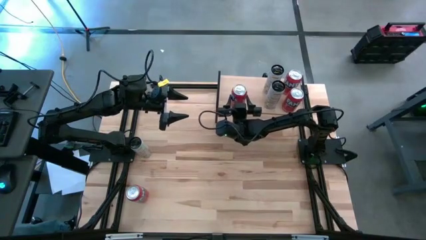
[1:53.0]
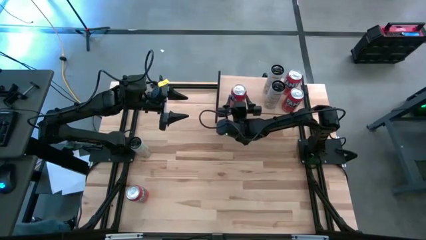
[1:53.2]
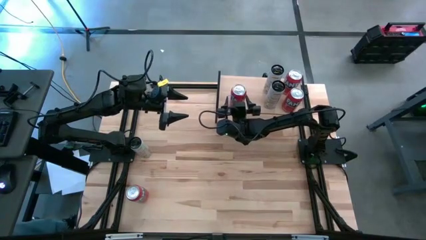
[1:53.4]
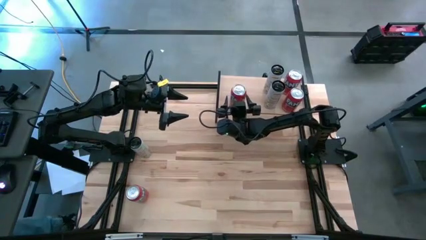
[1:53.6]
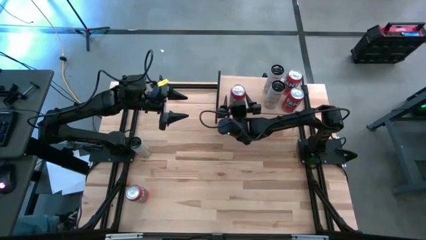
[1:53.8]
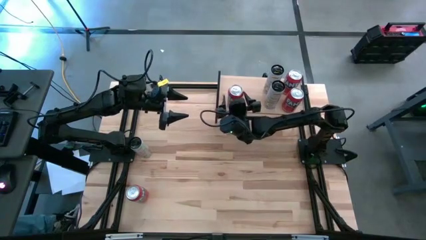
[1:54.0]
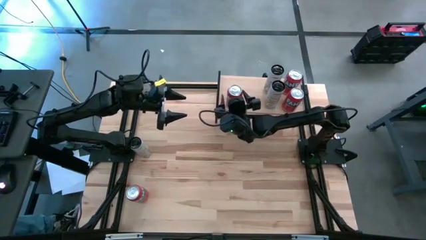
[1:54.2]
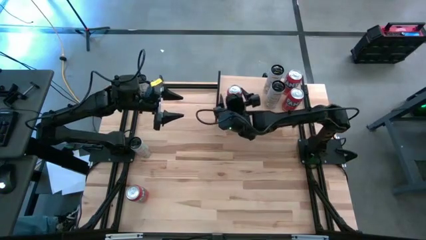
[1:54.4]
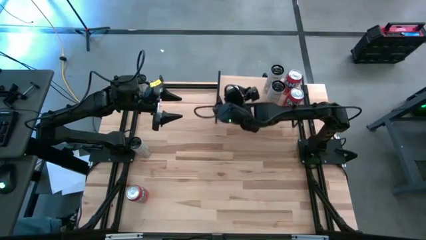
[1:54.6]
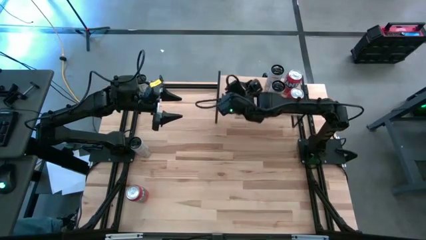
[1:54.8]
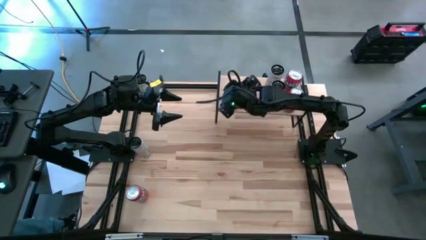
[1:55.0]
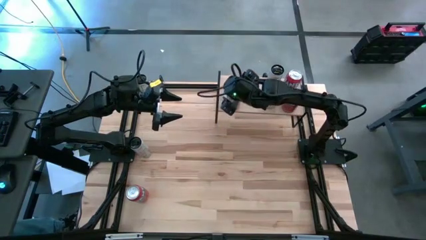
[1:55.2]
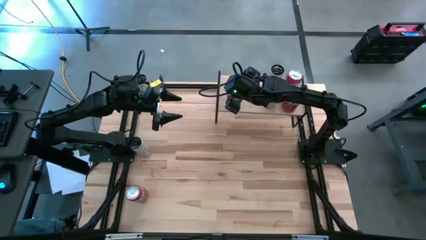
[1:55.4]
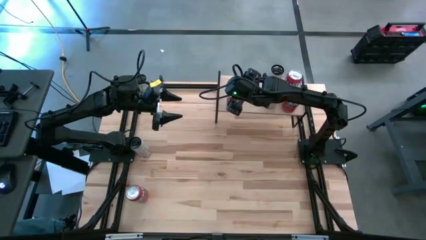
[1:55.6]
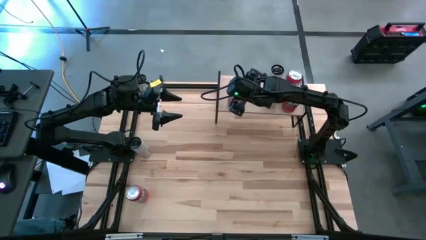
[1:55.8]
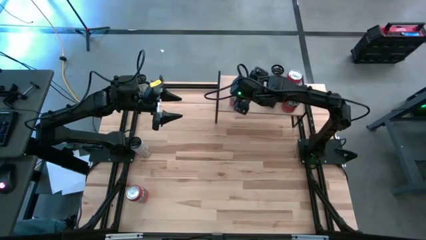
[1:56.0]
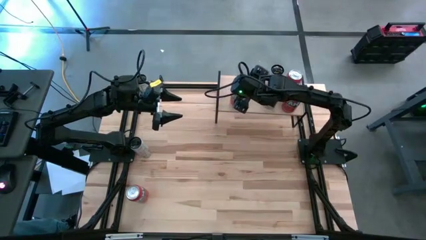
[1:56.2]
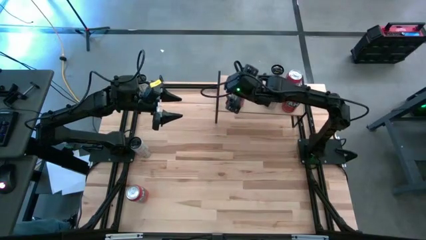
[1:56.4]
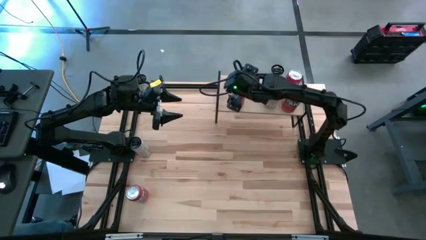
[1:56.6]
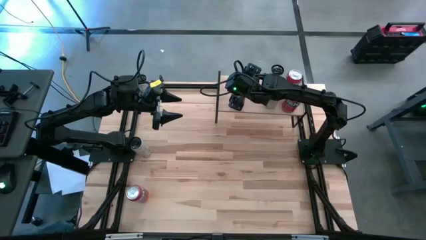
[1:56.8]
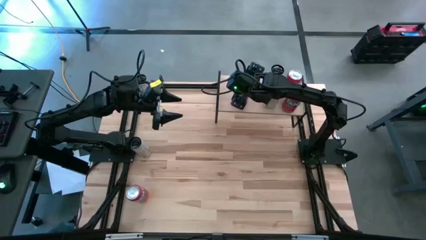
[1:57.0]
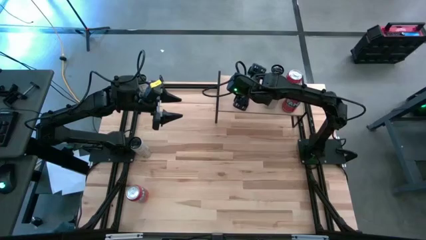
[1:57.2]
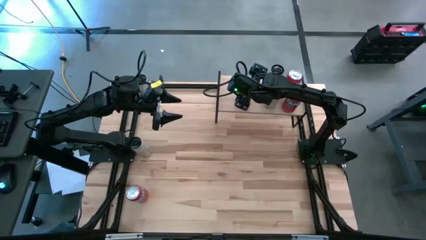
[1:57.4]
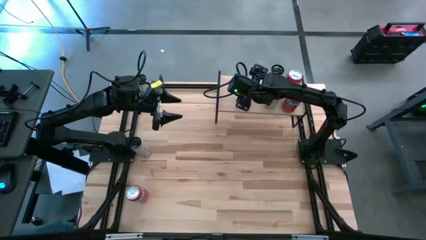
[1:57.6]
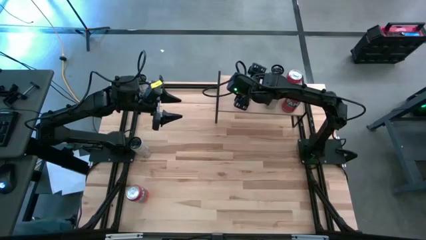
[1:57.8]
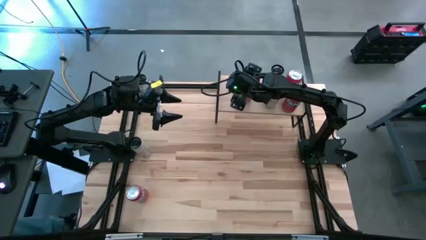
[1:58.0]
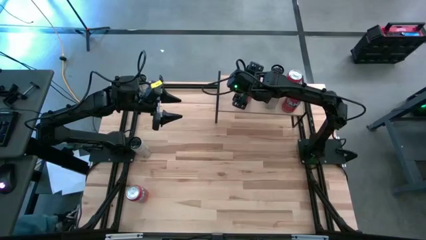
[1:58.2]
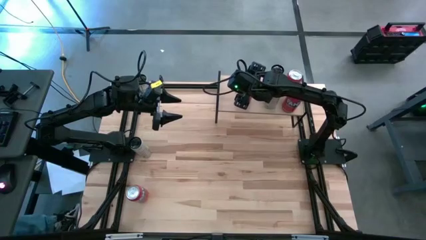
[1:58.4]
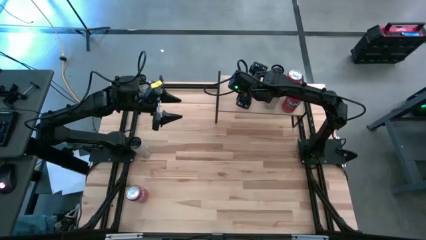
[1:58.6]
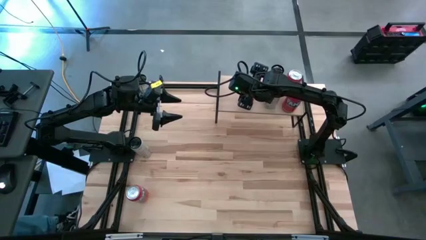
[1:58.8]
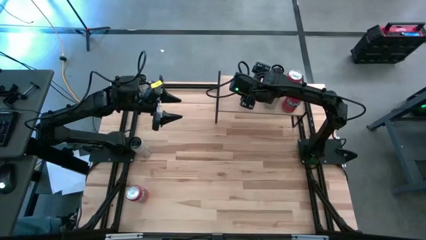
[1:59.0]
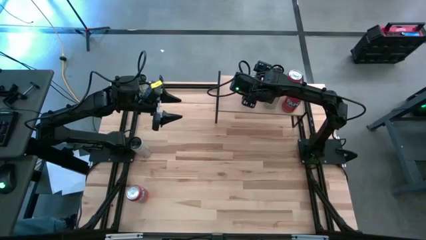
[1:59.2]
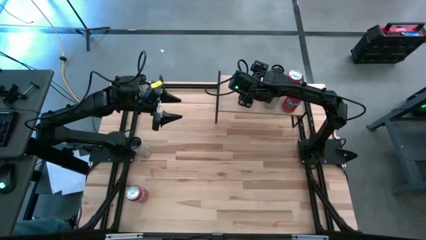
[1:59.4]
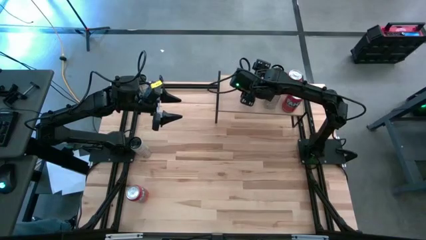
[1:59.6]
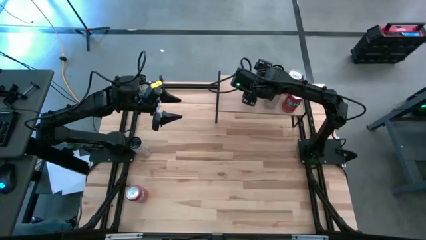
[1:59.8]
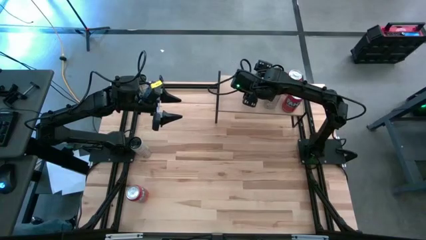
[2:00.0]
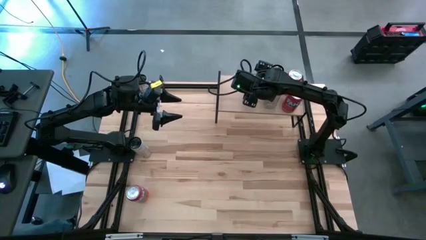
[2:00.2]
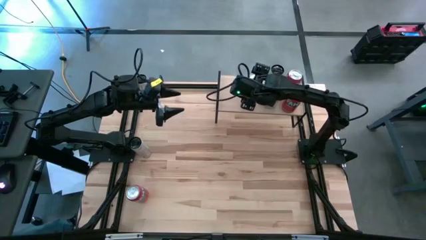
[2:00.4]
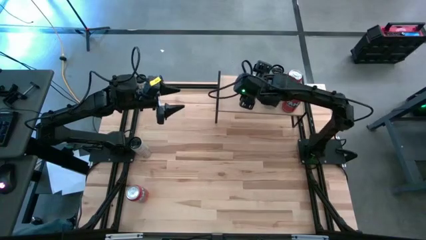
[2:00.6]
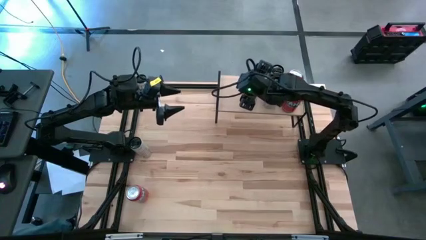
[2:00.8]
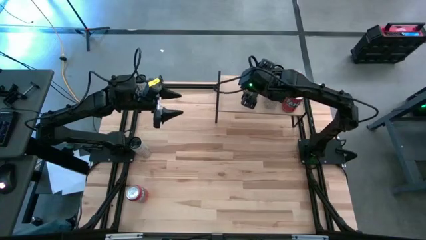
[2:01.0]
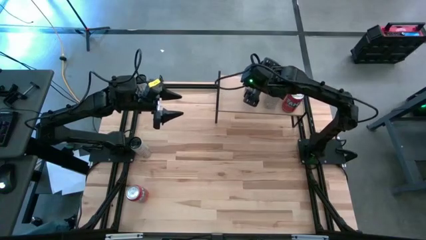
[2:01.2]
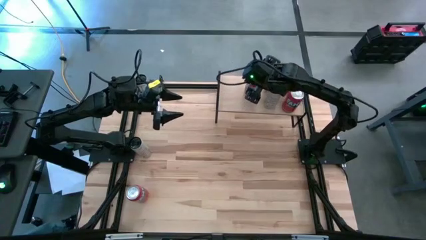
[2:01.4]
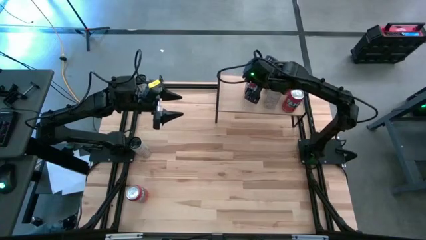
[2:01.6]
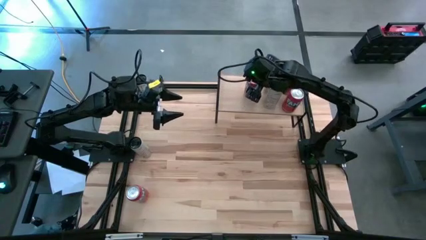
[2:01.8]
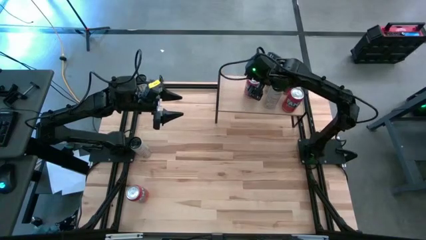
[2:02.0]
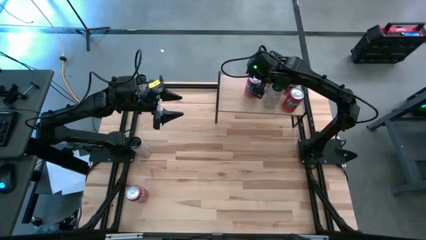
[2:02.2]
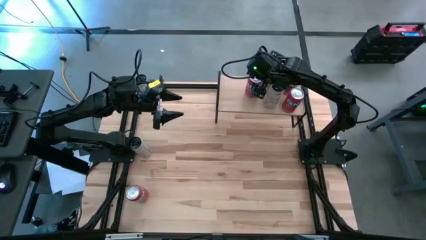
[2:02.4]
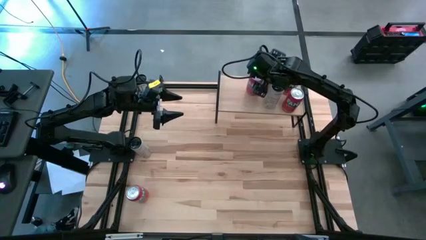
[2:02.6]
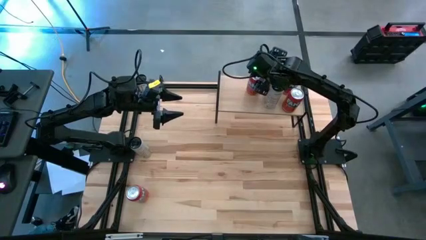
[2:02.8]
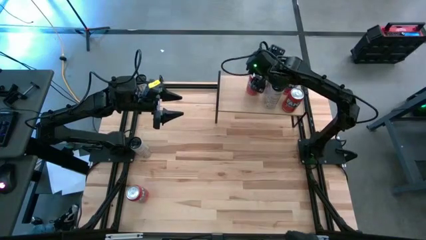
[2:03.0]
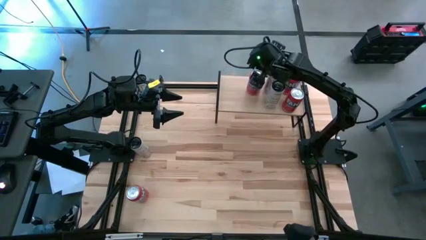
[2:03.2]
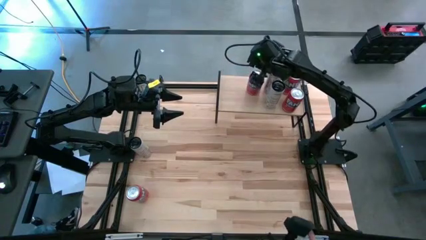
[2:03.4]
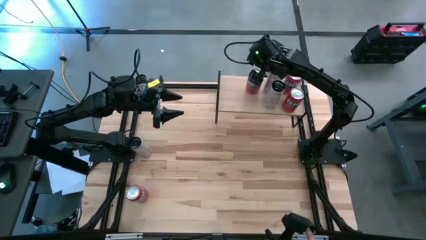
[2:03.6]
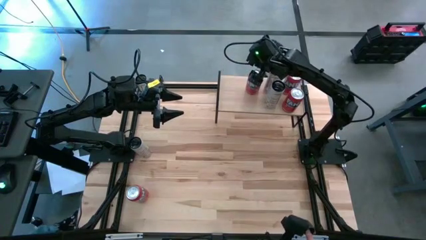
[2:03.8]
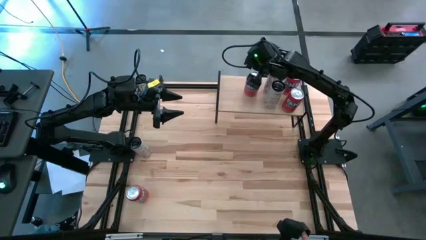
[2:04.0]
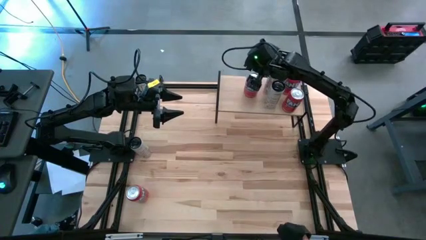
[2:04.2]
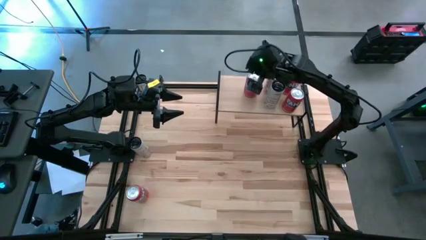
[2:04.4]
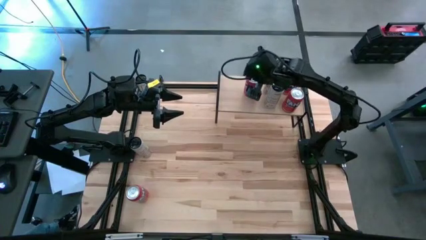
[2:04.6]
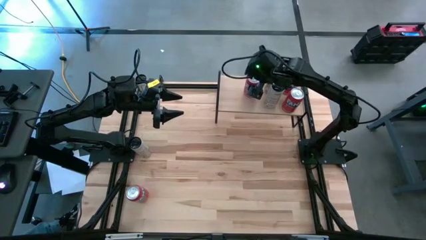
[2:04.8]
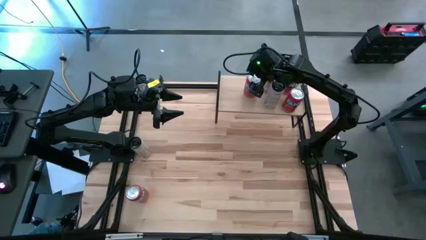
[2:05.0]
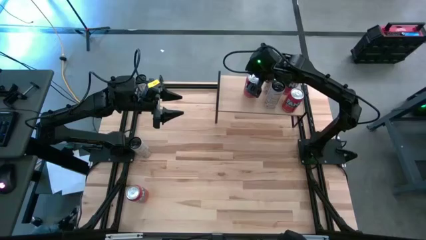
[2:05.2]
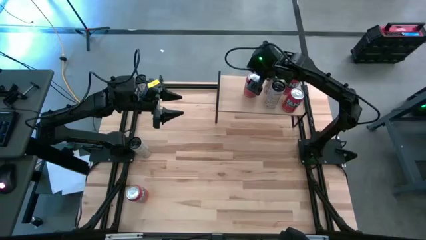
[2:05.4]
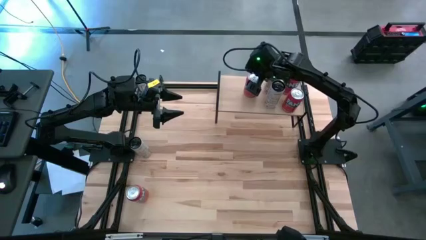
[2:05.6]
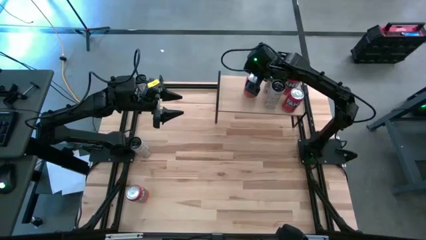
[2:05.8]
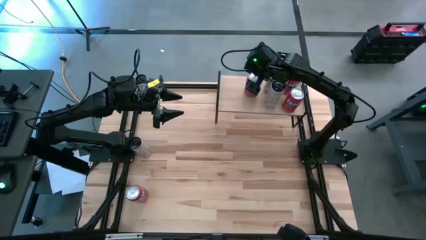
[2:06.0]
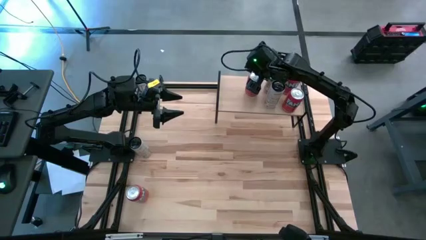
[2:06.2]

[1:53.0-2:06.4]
Task: Place canned beverage on shelf
Put the orange soda can on the shelf

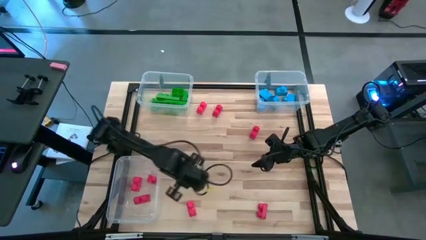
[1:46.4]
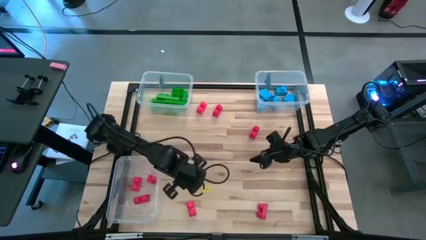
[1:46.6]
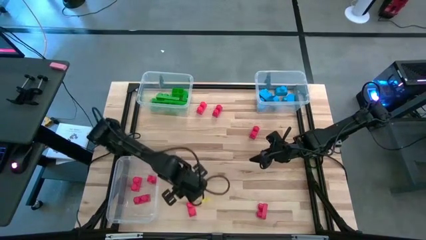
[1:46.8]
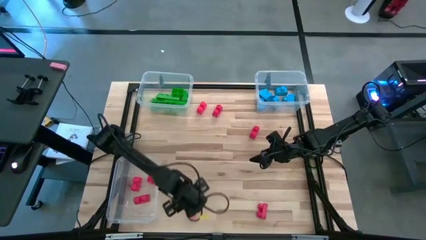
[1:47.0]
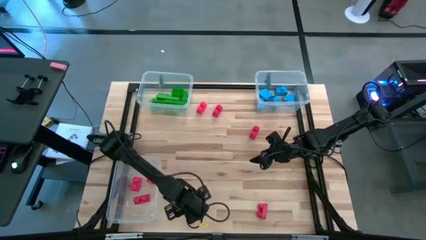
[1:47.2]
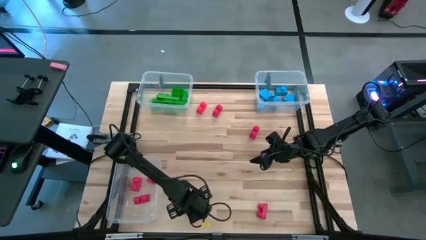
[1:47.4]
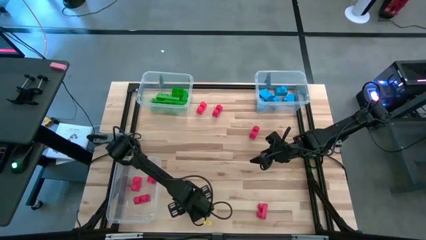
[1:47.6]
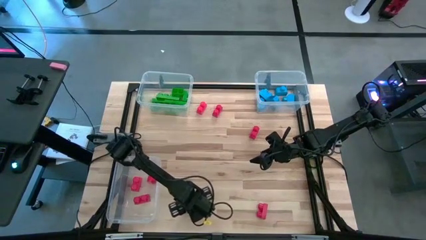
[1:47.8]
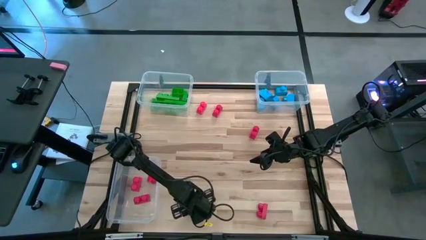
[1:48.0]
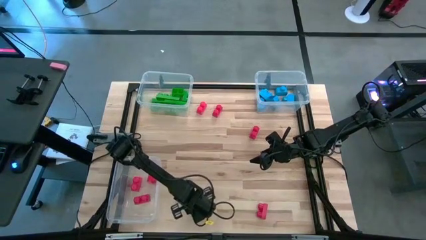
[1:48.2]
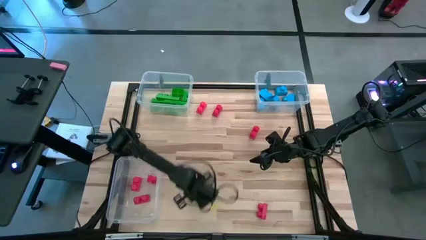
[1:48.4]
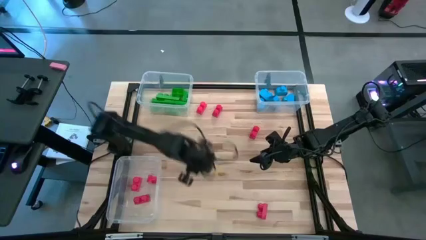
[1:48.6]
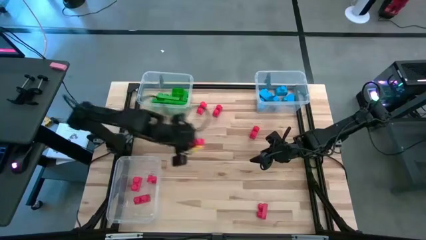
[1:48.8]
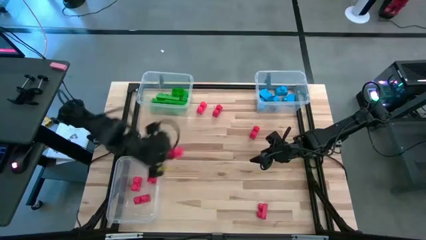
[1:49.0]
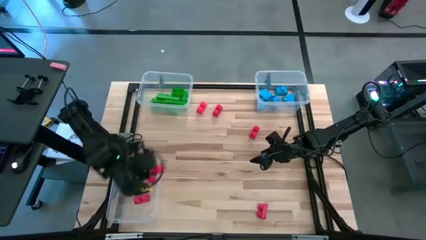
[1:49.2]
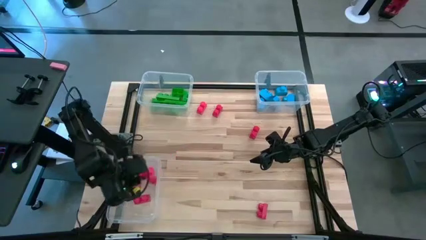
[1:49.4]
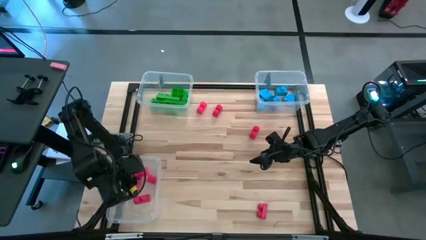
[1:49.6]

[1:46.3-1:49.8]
Task: Sort blocks
Put the red game piece into the bottom left transparent bin

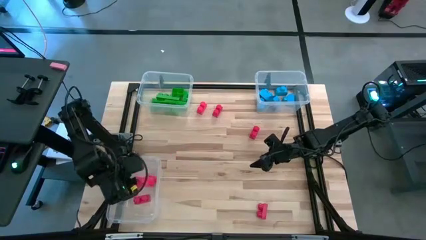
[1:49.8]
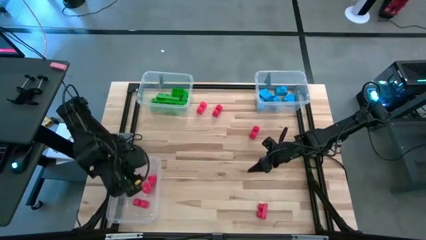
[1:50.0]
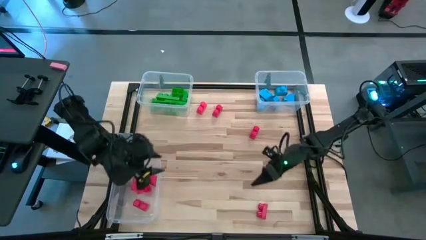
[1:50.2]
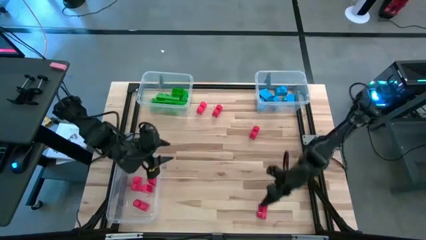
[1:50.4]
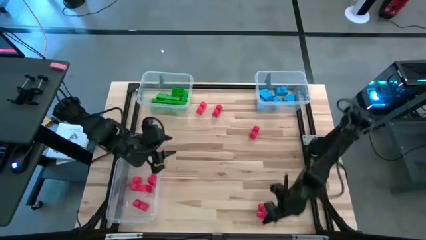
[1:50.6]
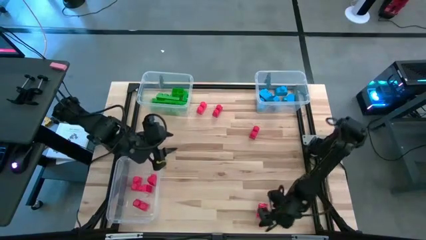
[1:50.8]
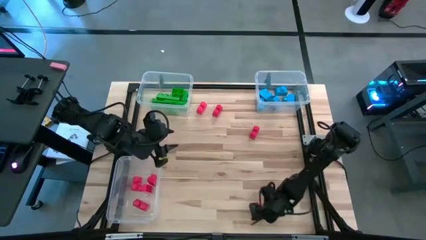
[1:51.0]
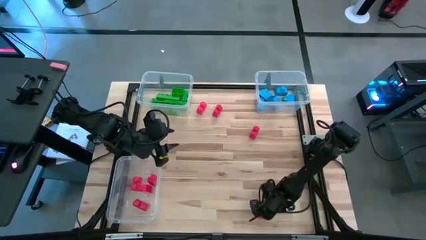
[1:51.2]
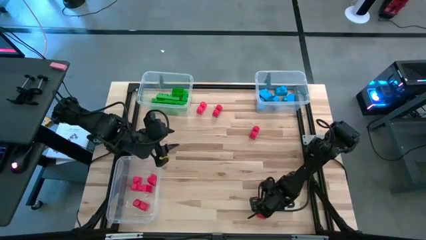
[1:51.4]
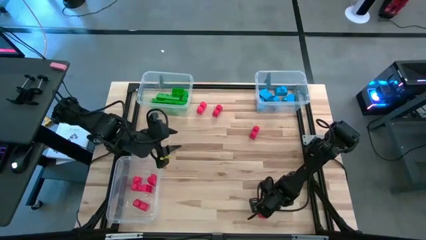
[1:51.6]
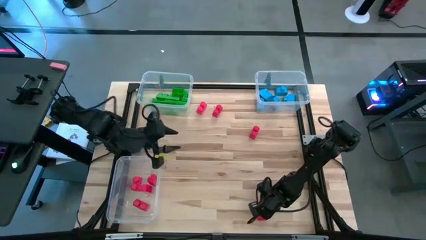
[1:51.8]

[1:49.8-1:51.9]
Put the red game piece into the bottom left transparent bin
